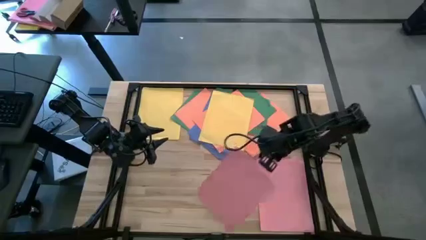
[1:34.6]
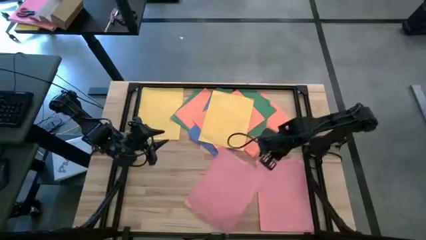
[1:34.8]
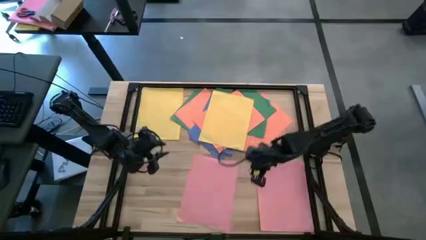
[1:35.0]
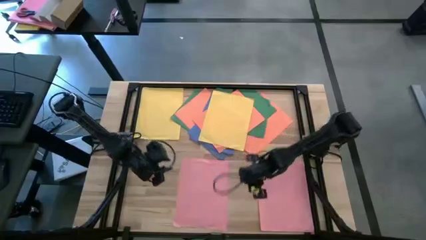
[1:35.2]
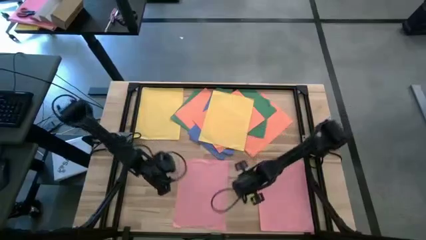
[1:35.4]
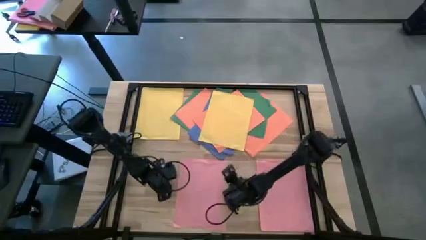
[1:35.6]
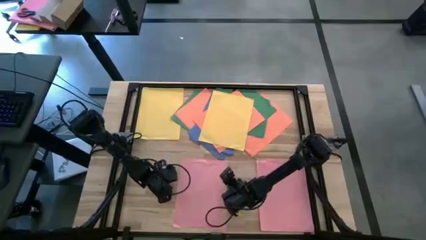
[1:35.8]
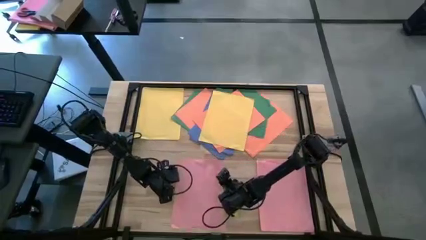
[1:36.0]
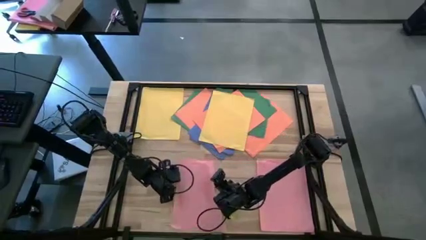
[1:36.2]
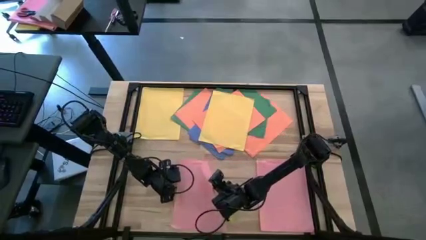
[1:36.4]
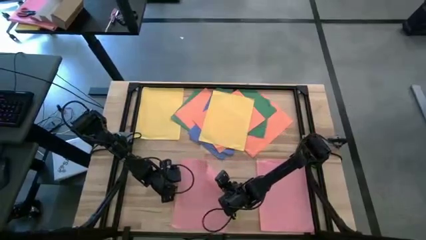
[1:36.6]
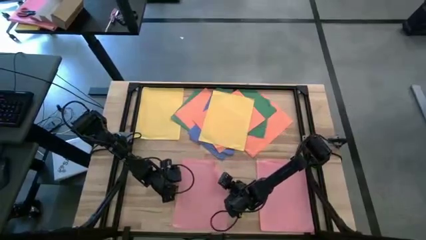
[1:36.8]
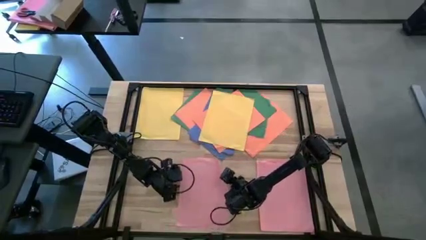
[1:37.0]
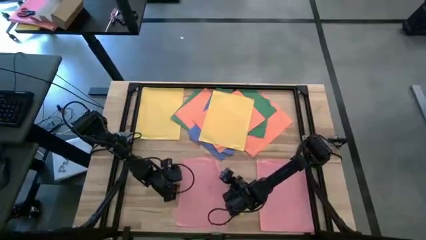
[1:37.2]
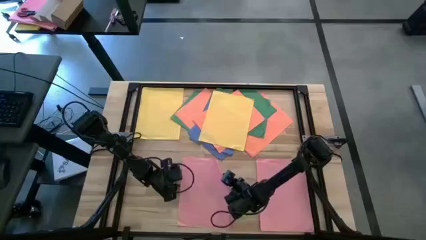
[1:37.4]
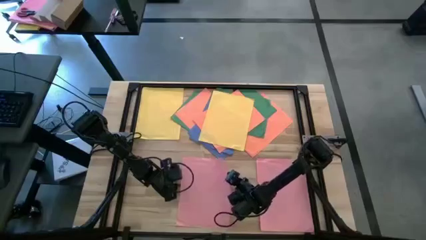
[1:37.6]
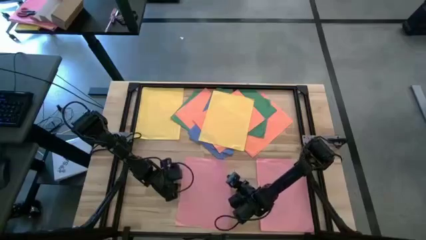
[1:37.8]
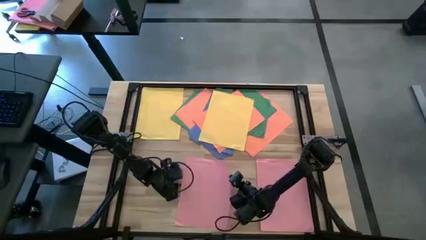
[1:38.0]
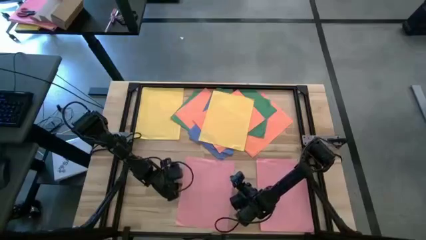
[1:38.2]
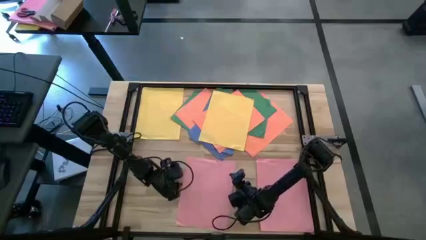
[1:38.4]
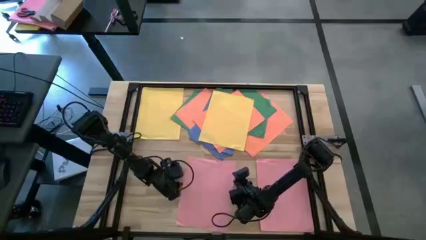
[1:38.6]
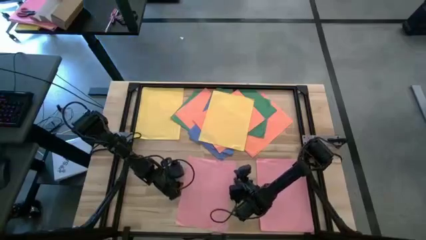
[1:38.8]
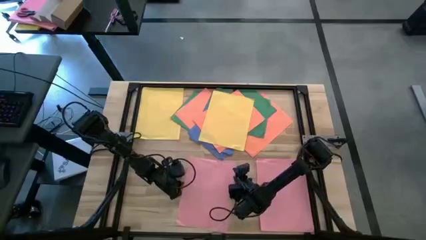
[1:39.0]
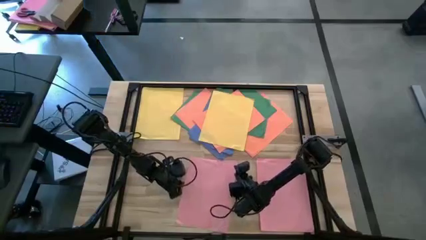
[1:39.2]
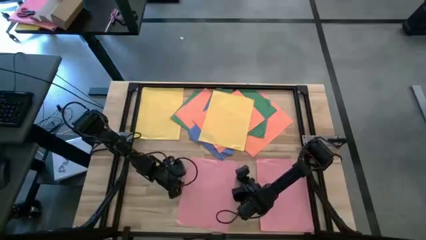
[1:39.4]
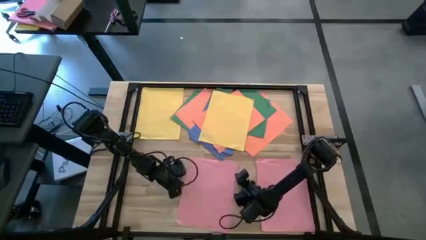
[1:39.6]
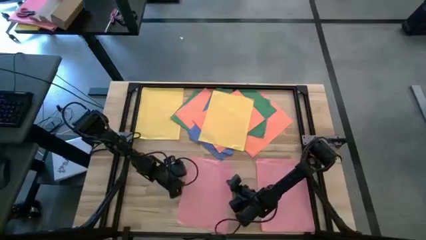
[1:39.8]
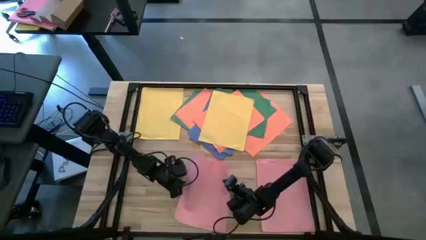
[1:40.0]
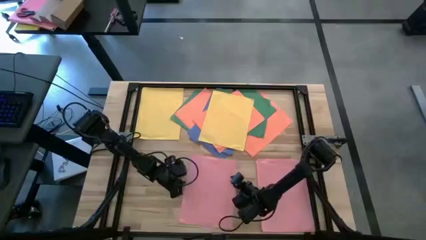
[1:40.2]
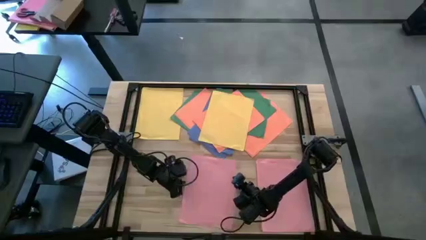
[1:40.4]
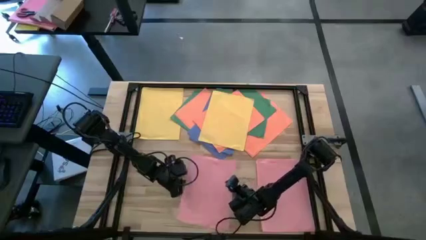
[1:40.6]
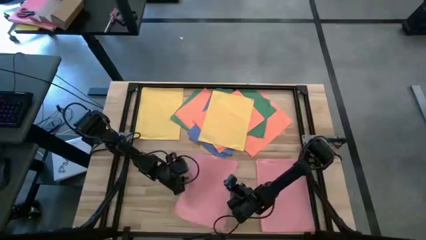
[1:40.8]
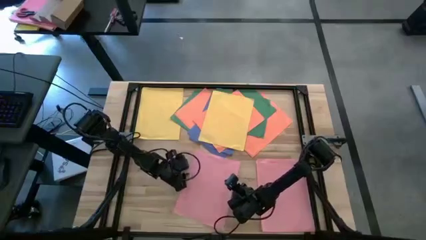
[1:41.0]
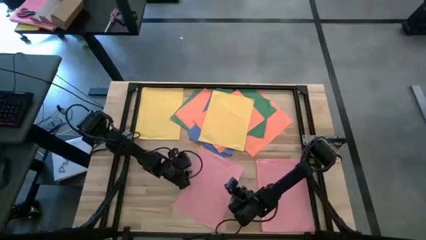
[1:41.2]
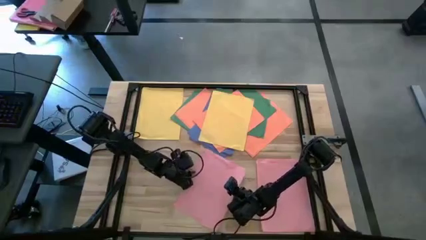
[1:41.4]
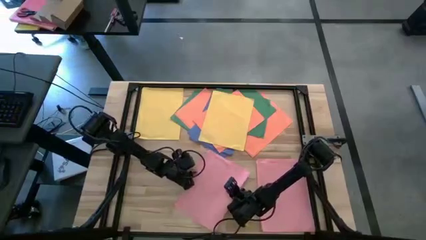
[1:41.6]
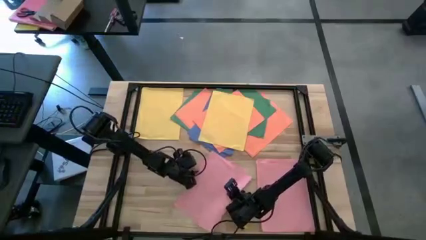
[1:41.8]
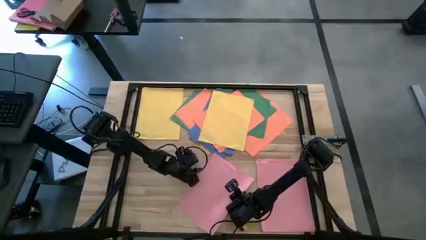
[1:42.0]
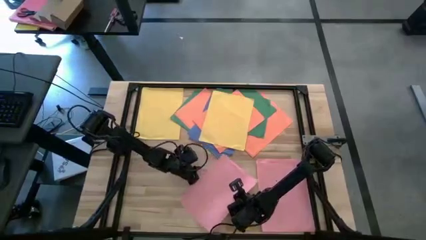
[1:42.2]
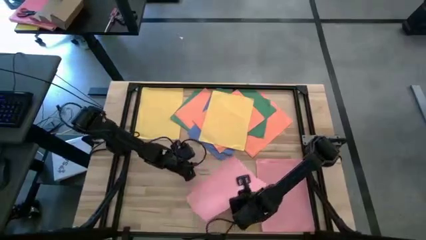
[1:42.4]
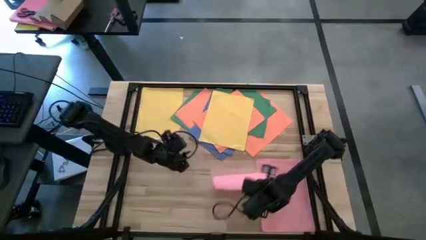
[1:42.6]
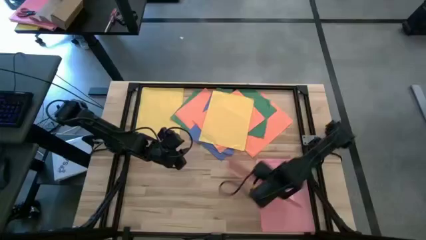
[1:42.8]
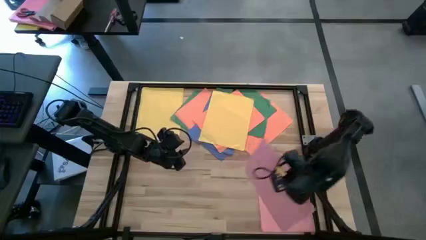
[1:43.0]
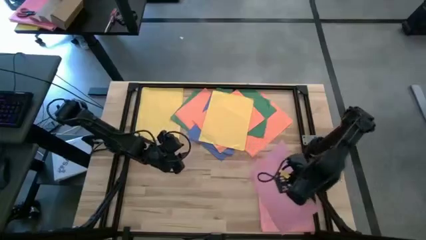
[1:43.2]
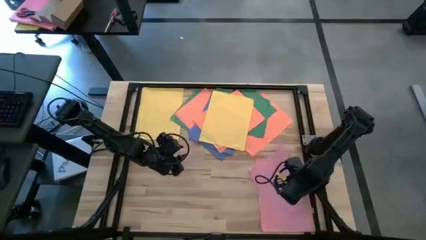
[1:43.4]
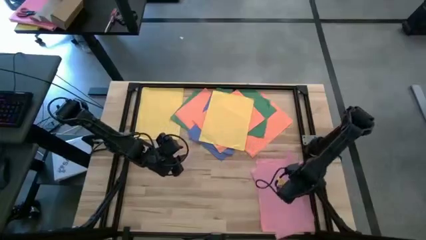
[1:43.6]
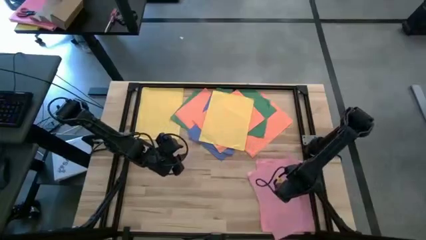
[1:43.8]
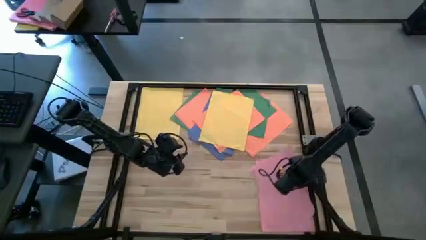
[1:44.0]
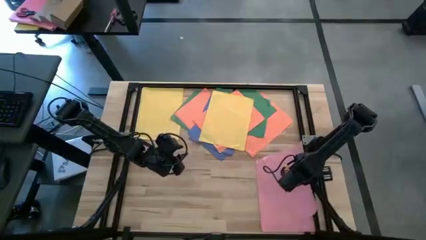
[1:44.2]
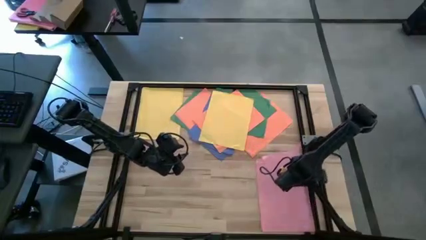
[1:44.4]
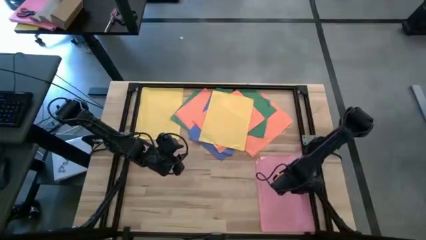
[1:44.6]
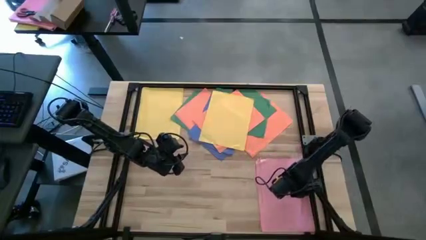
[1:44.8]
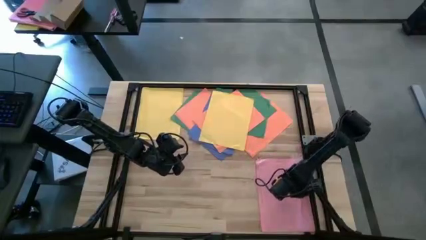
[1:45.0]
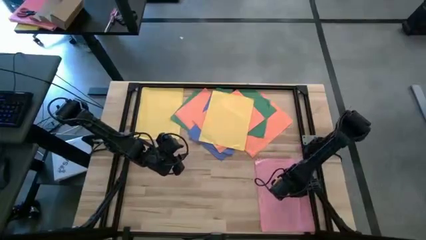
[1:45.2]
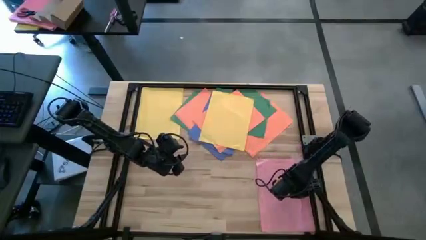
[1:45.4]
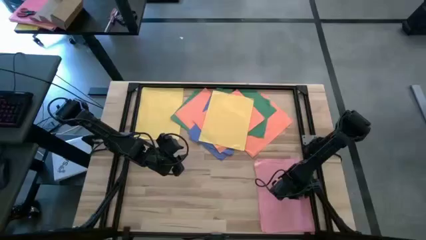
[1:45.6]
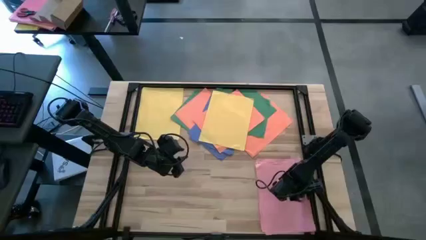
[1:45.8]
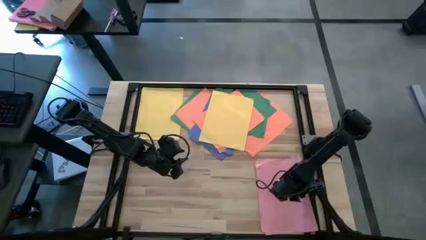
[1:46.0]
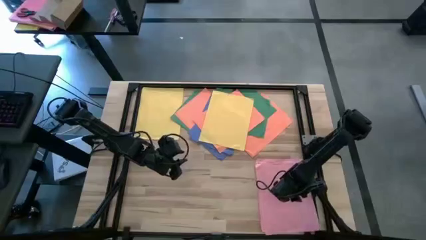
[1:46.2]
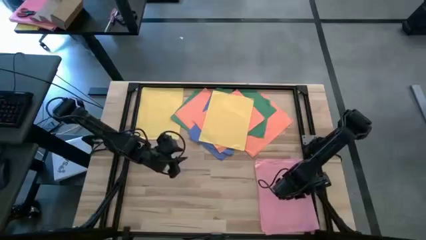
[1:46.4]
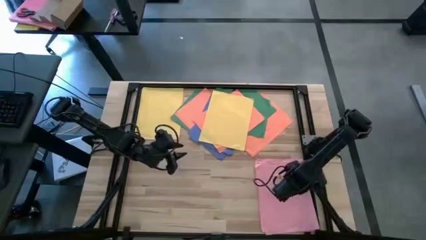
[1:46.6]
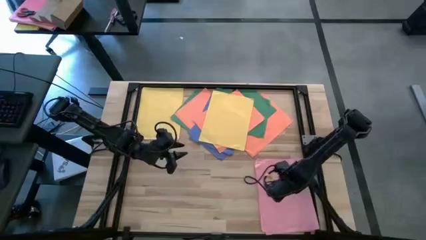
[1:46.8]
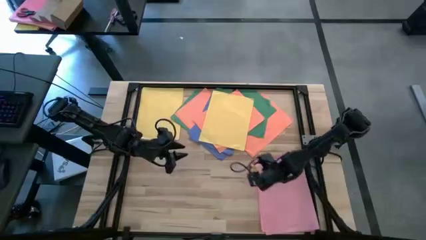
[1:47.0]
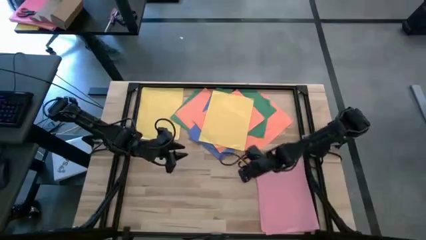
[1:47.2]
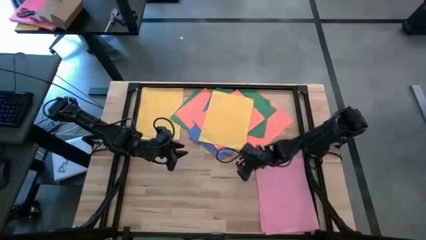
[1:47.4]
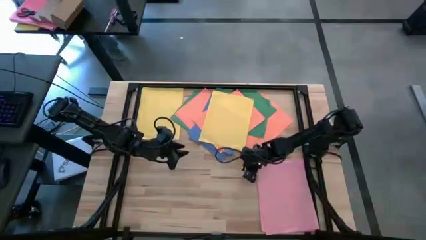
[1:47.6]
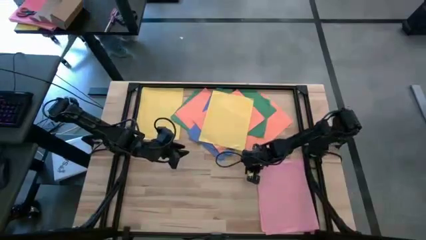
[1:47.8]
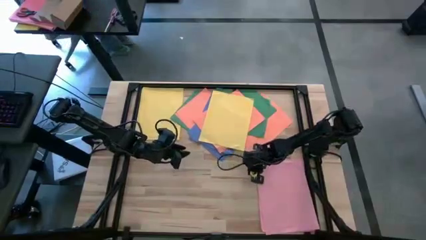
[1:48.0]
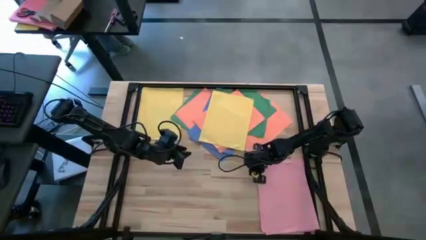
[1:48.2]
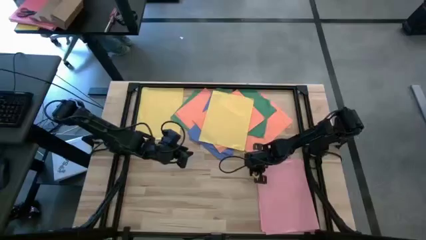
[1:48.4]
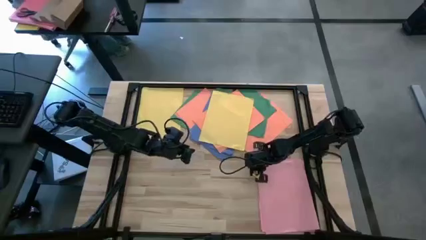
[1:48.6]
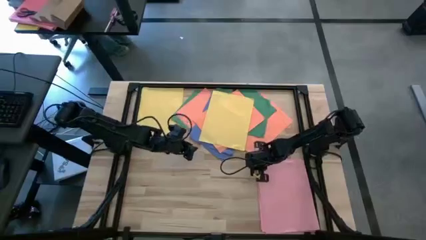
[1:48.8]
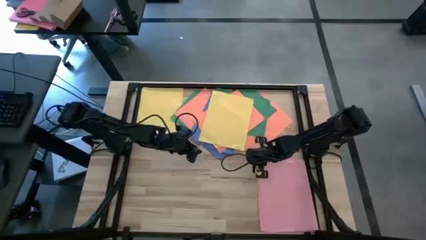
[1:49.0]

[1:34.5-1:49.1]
Task: Organize paper
Stack the pink paper on top of the stacked pink papers

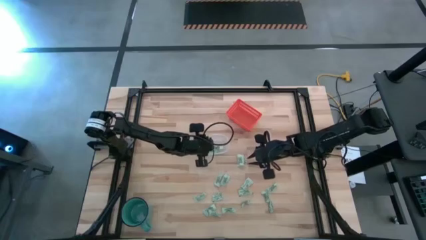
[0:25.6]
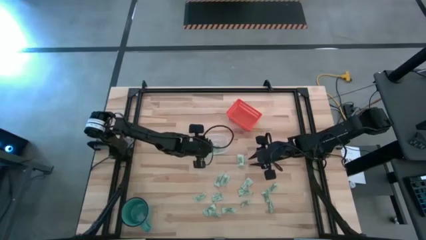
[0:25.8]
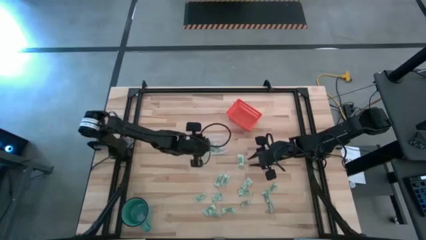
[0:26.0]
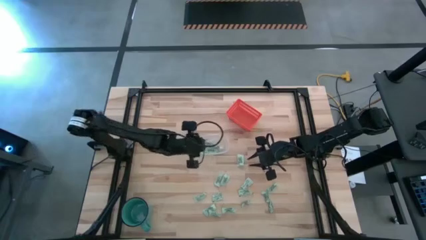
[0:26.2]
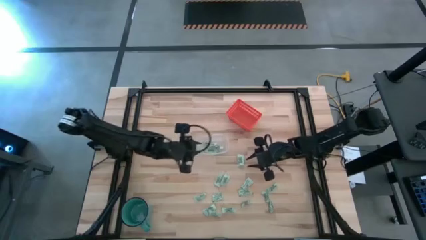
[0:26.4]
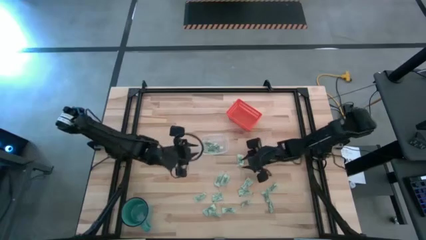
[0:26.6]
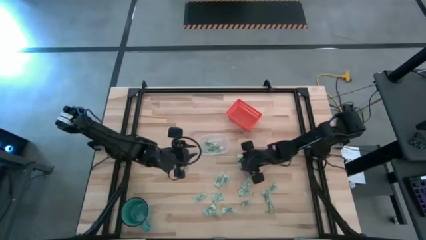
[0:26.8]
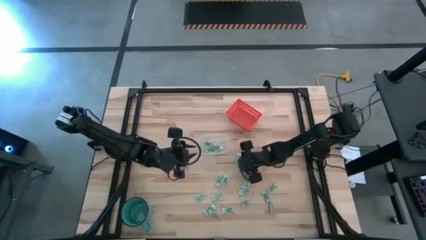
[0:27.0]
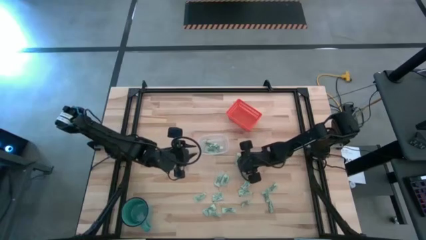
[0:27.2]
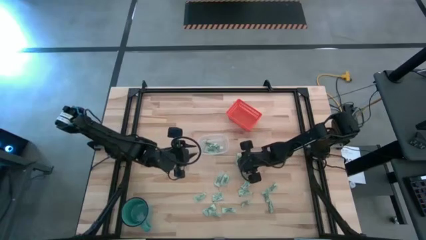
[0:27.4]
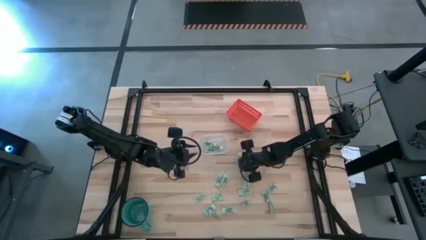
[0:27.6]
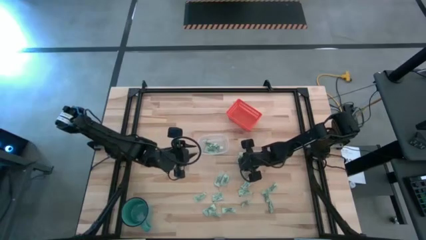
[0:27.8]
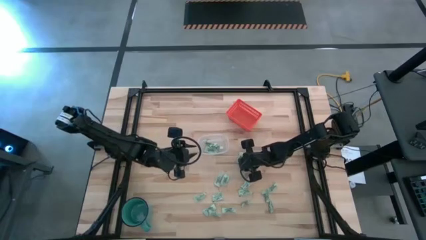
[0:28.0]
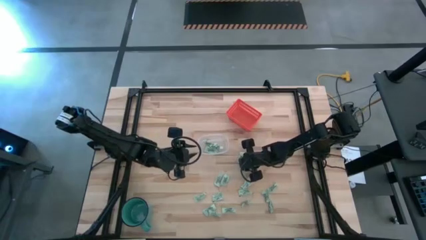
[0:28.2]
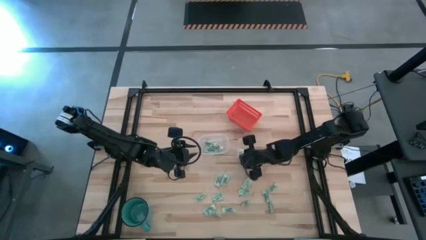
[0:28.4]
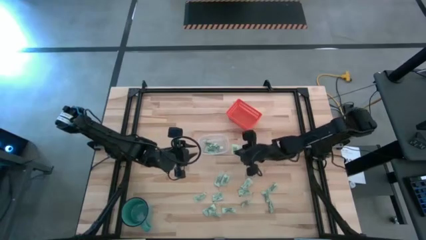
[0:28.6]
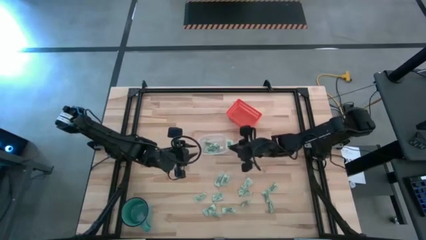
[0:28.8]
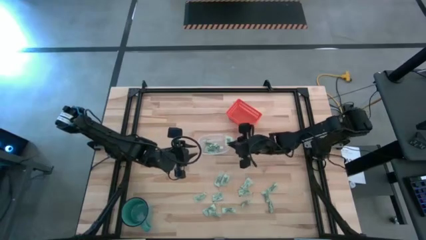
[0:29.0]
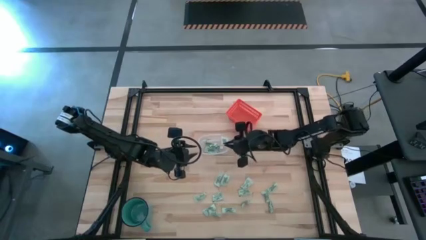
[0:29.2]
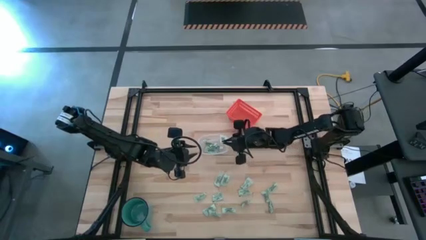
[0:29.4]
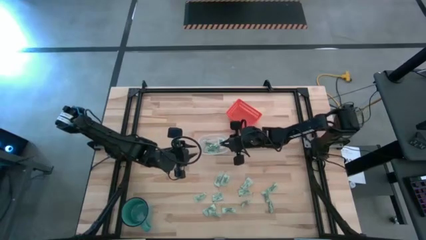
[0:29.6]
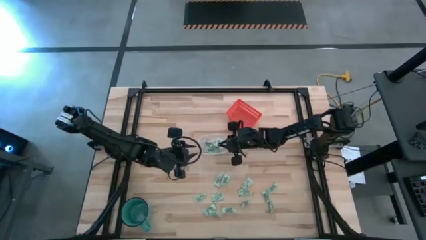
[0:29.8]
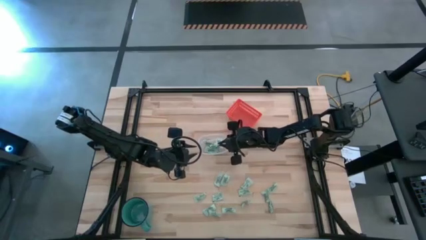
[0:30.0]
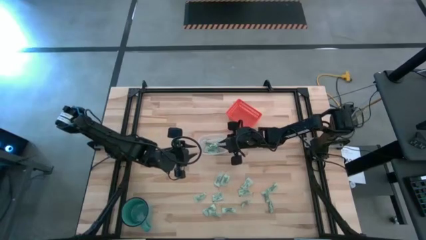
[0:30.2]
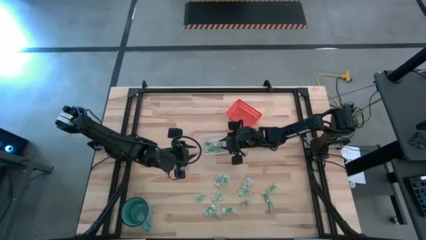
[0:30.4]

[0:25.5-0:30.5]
Task: Pick and place items into bin
Put the stevia packet into the transparent bin
